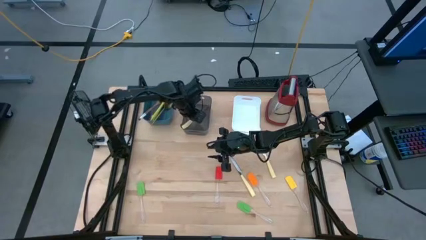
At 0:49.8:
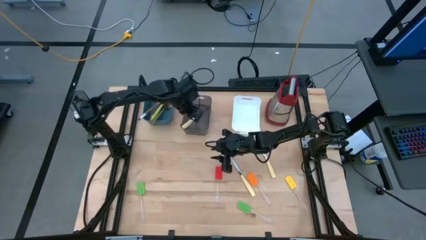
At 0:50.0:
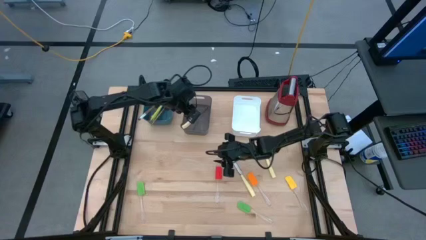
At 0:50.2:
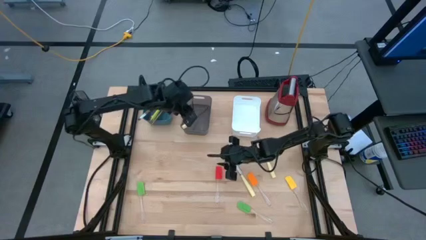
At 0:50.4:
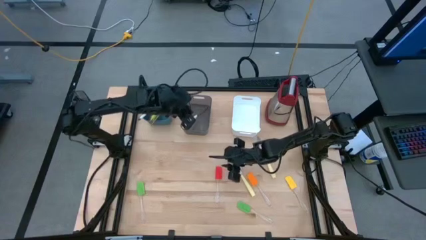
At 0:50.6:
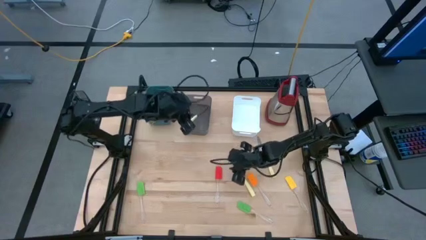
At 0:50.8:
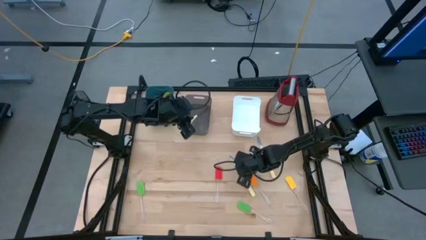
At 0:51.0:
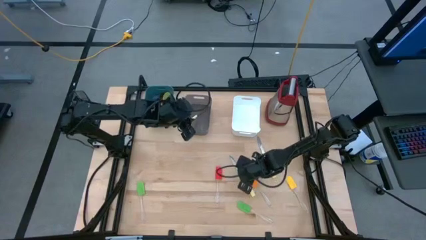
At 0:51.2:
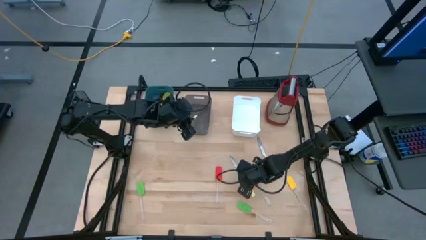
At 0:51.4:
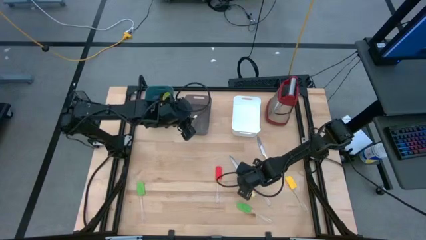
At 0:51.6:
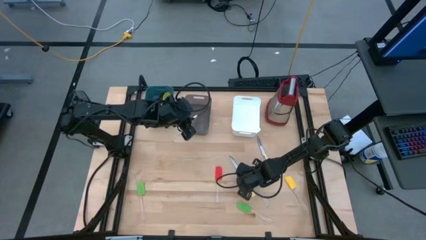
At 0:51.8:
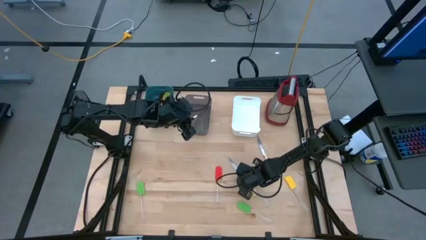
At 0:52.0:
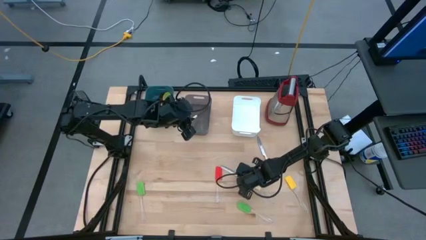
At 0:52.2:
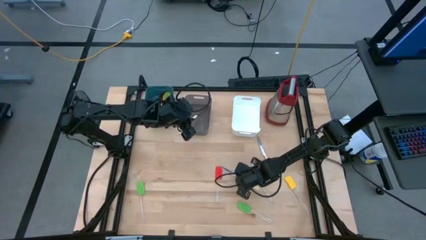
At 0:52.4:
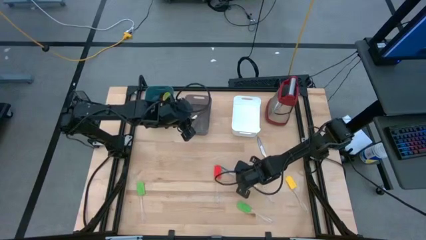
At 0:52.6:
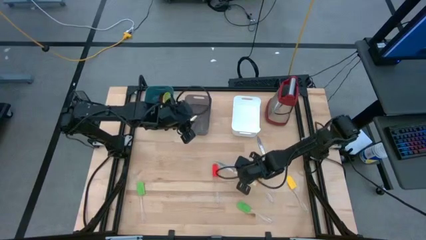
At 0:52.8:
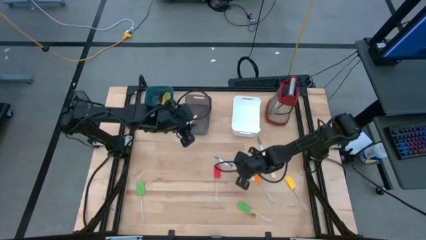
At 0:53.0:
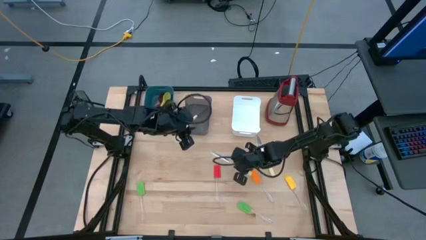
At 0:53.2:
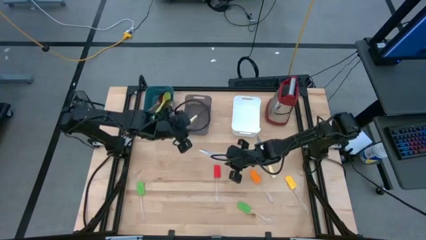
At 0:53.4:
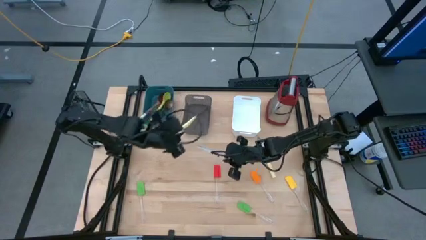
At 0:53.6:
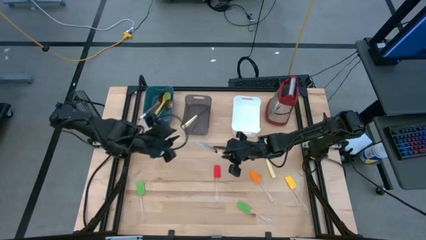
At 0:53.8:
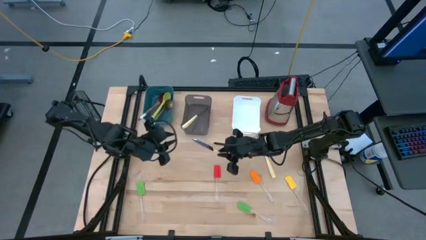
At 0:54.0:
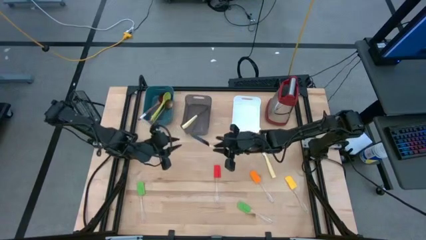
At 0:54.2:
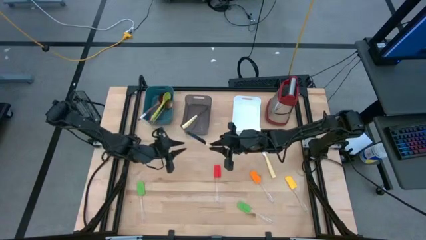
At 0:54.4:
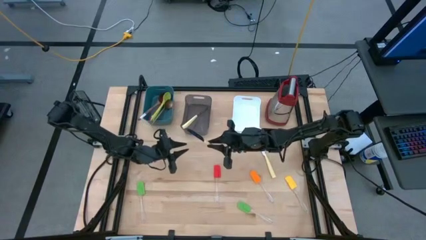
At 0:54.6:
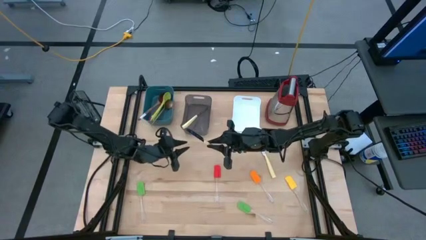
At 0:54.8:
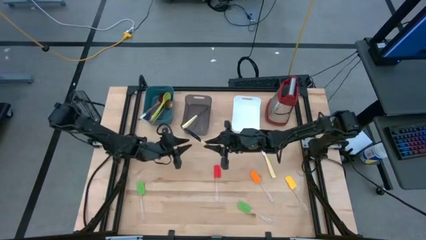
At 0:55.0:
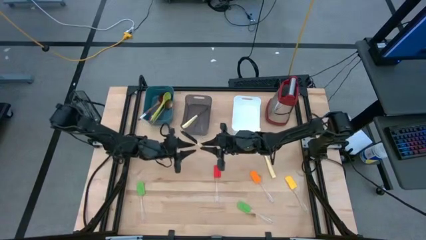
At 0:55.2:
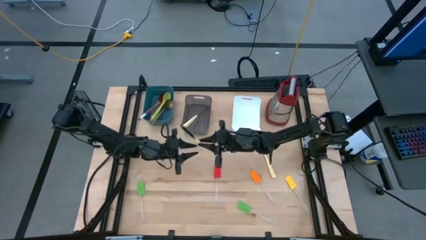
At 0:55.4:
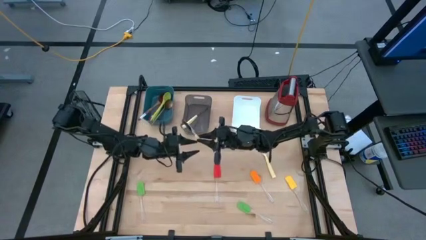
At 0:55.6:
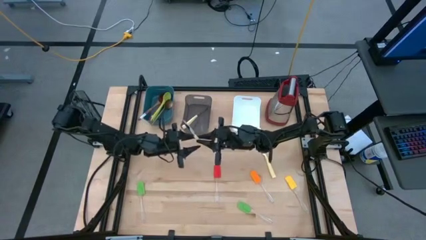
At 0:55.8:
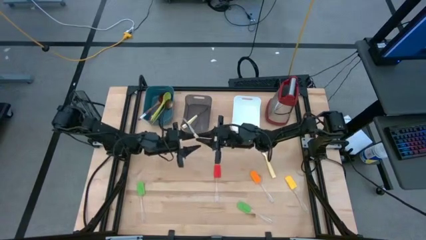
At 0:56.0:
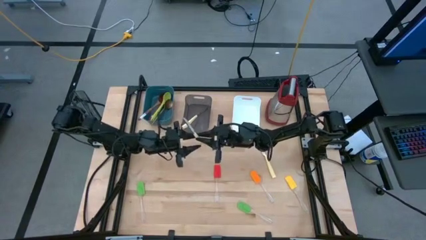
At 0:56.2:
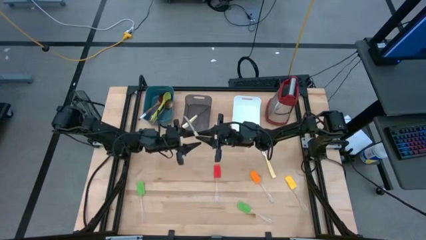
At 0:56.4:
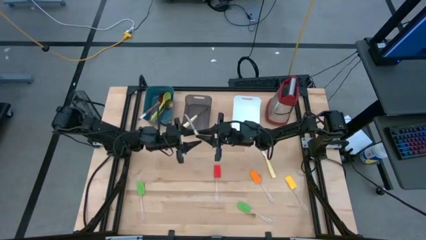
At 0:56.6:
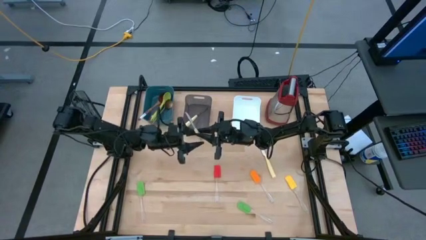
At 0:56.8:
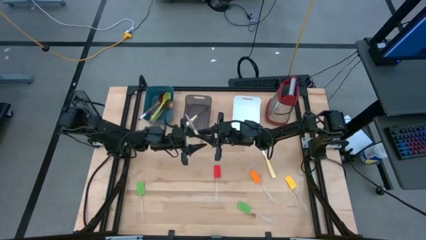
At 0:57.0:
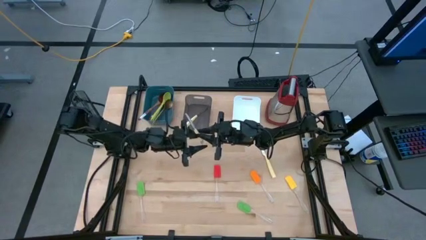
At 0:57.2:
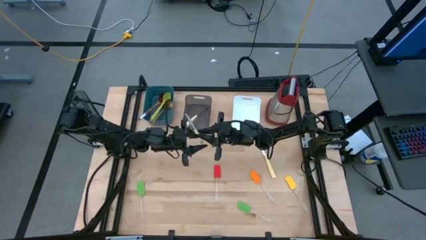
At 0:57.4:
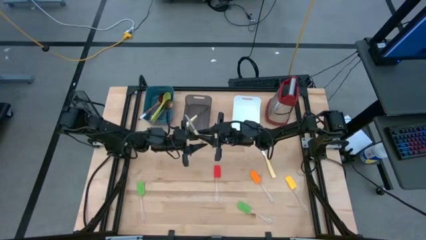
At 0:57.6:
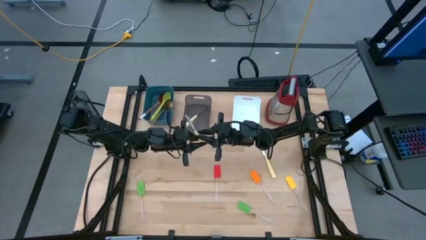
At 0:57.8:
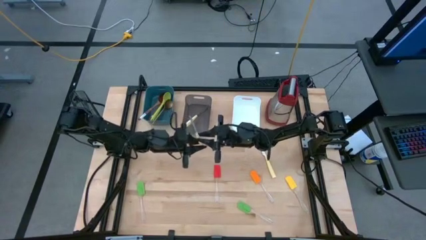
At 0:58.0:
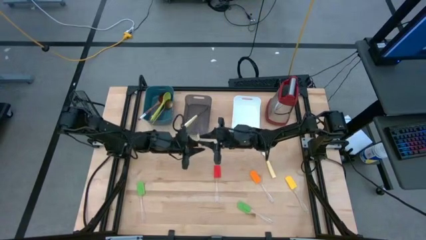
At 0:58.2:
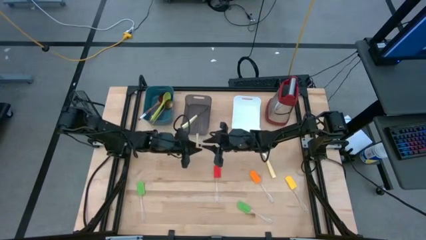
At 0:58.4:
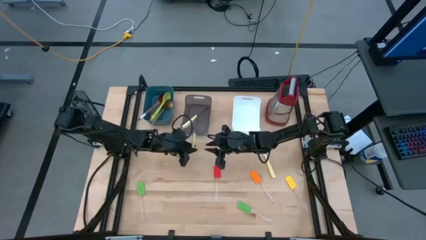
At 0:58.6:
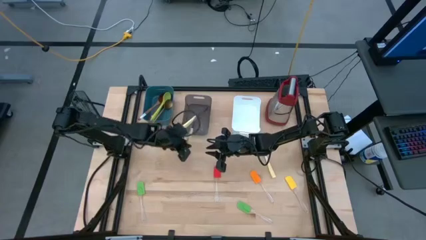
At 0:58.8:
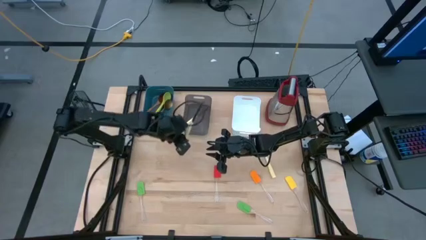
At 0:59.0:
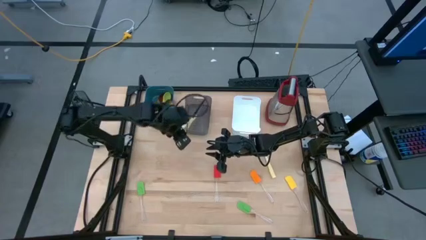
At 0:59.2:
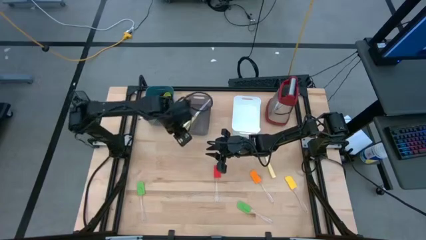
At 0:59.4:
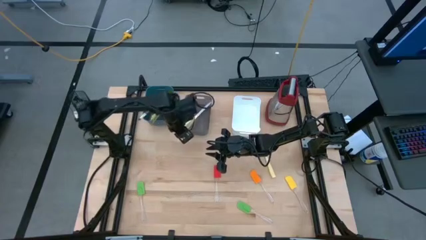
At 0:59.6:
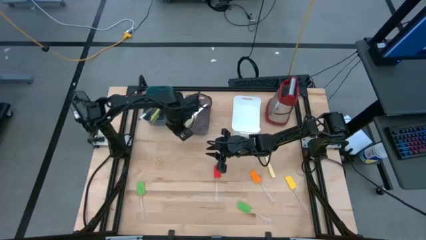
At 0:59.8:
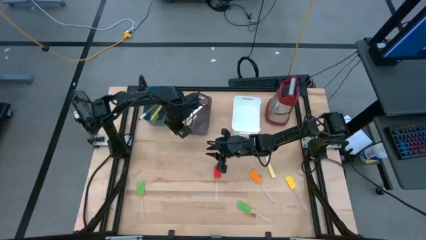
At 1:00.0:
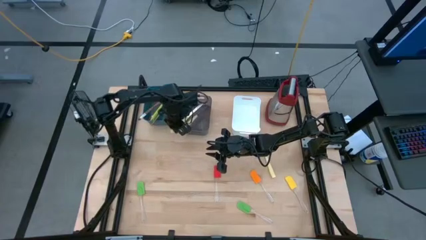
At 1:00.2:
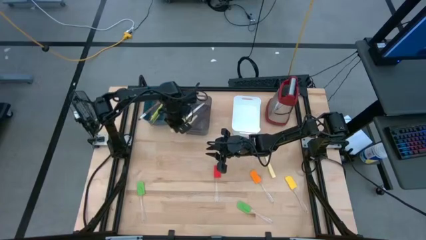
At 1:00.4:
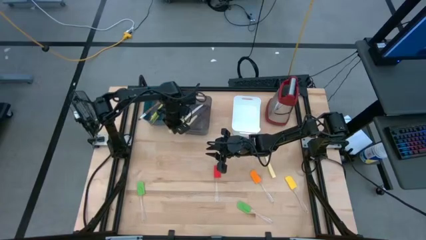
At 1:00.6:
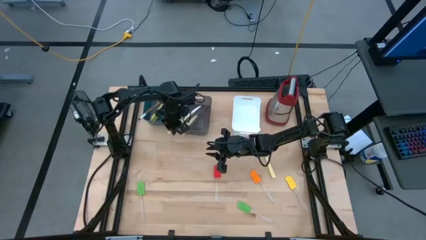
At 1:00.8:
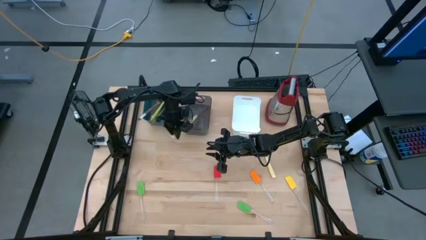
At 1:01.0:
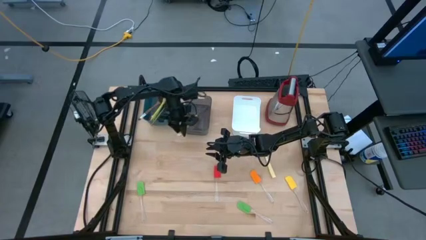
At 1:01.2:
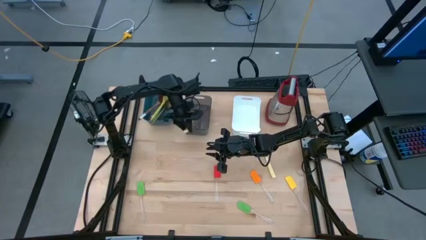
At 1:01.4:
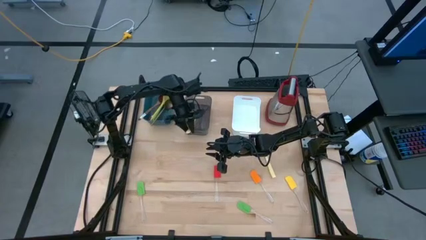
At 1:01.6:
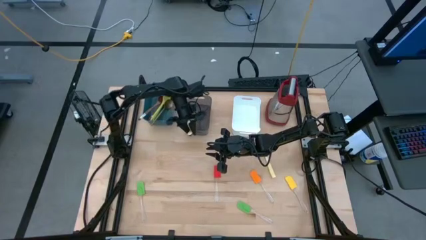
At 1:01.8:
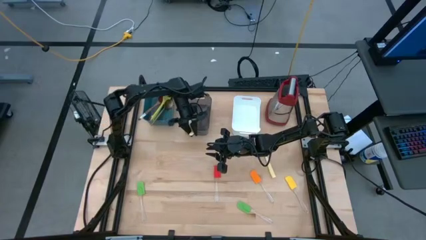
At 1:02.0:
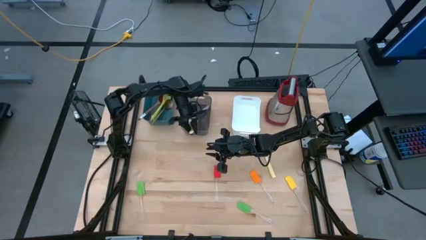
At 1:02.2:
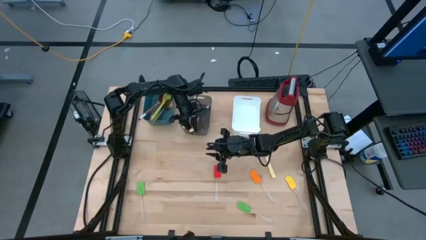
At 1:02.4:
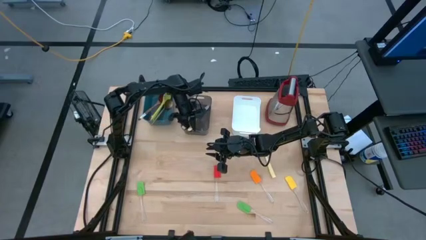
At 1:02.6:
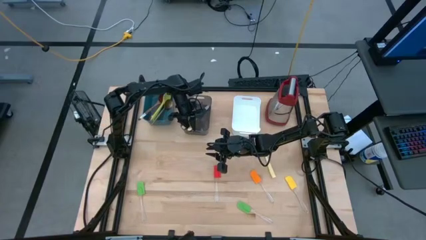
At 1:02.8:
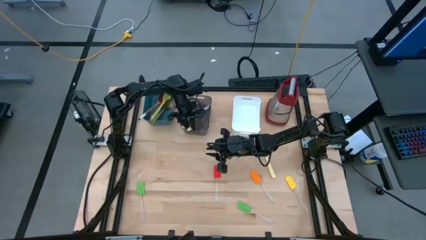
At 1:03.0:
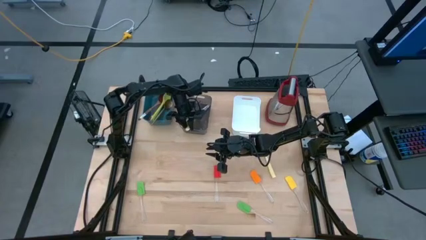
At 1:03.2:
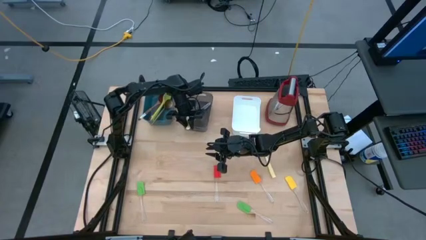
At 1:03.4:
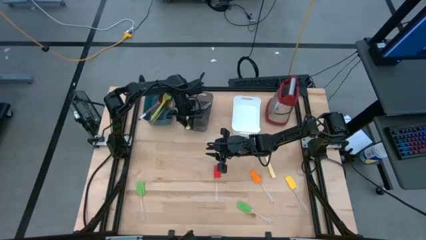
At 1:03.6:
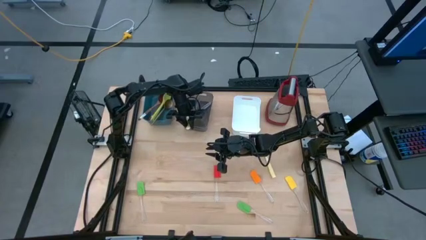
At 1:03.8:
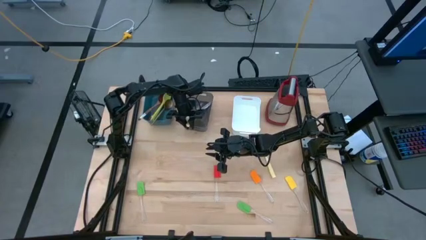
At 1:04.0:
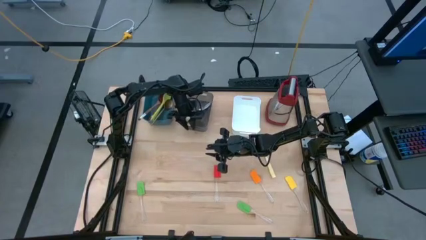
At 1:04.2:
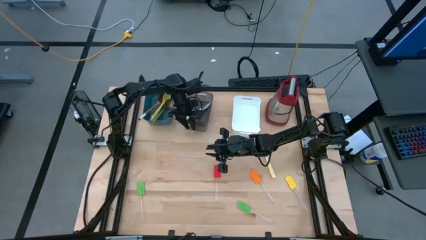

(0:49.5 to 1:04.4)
Task: Pick & Place Kitchen Items
Put the bottom yellow knife into the black bin
